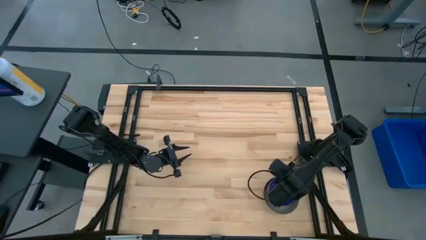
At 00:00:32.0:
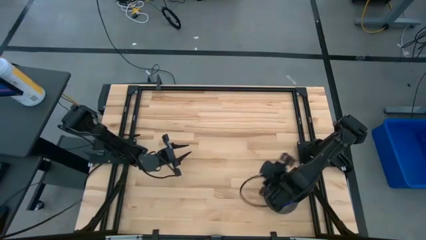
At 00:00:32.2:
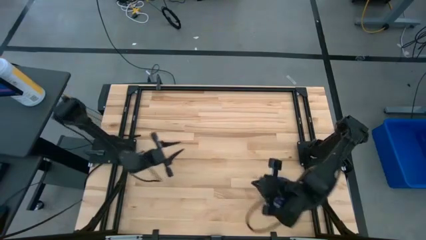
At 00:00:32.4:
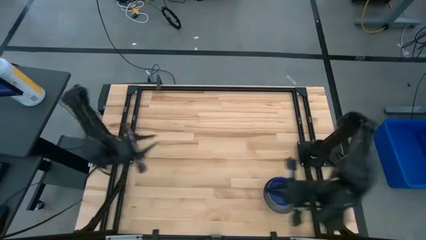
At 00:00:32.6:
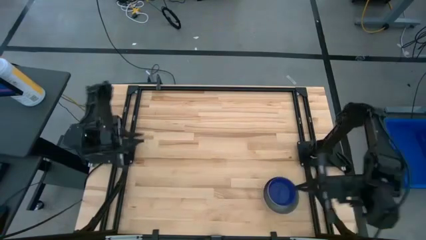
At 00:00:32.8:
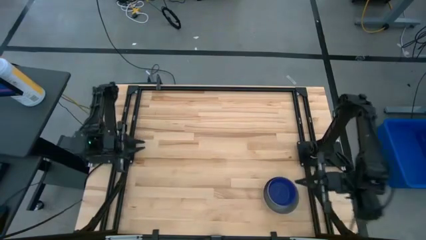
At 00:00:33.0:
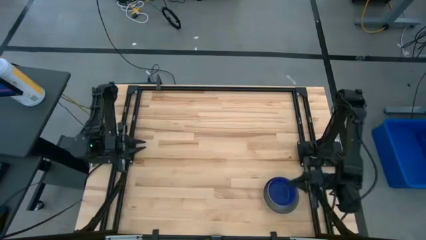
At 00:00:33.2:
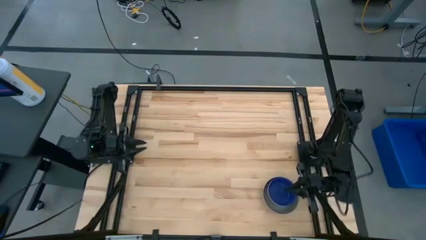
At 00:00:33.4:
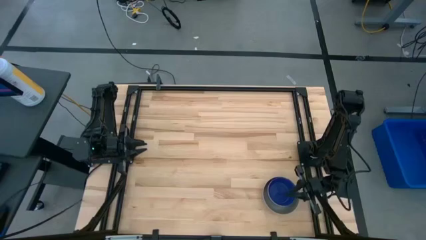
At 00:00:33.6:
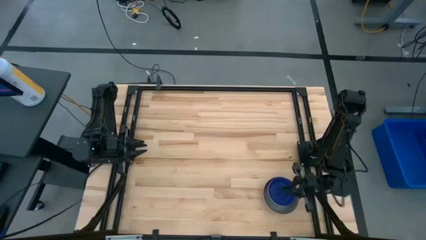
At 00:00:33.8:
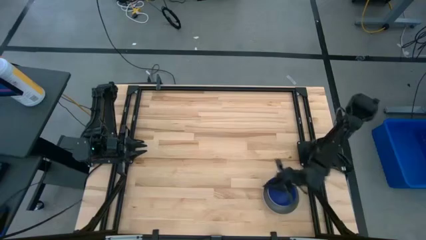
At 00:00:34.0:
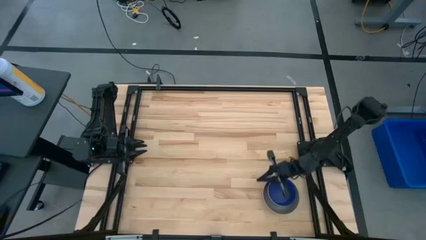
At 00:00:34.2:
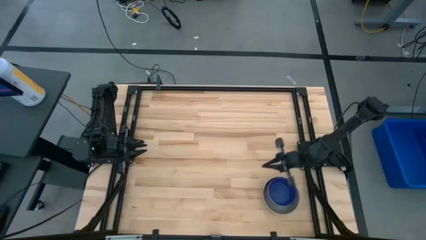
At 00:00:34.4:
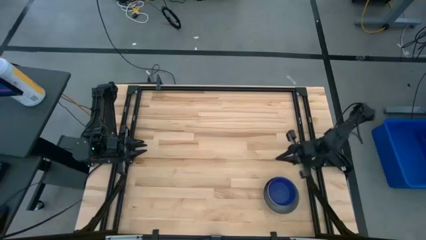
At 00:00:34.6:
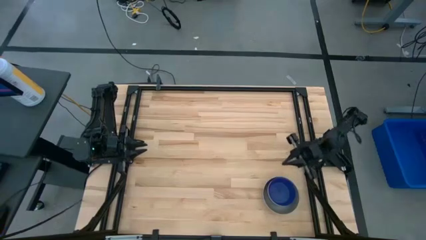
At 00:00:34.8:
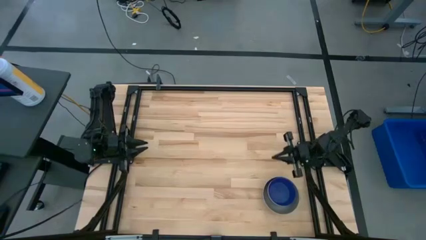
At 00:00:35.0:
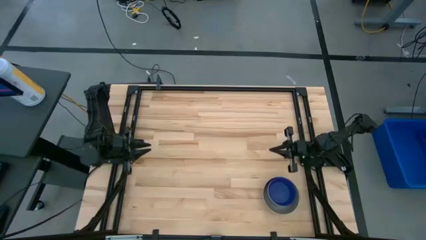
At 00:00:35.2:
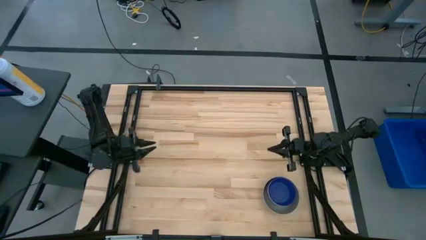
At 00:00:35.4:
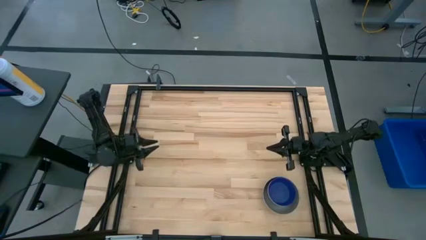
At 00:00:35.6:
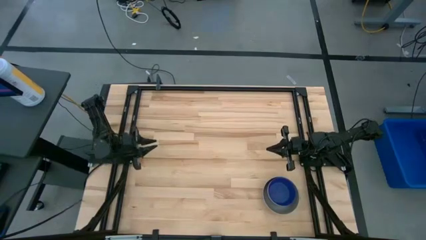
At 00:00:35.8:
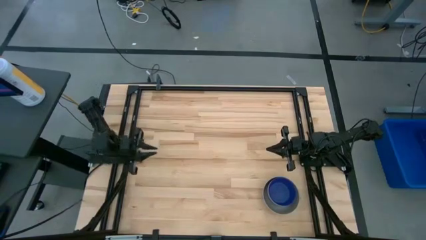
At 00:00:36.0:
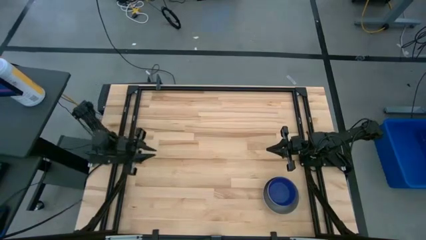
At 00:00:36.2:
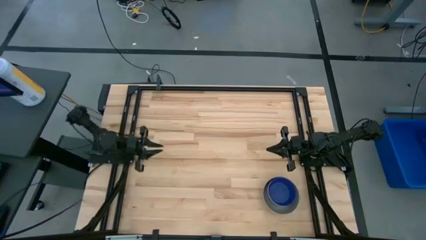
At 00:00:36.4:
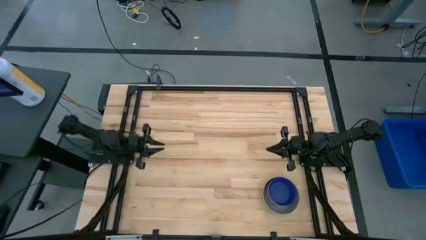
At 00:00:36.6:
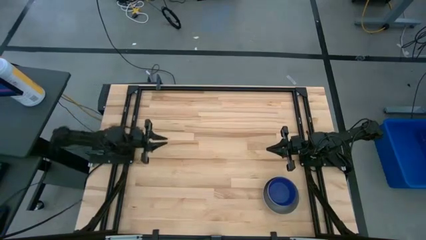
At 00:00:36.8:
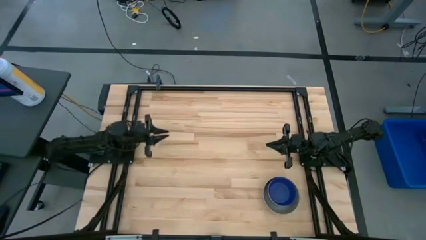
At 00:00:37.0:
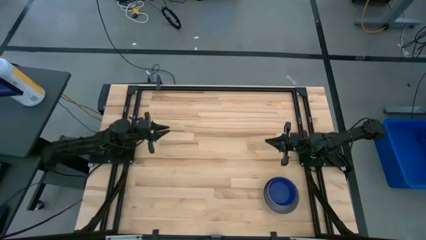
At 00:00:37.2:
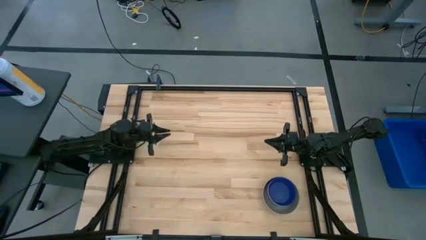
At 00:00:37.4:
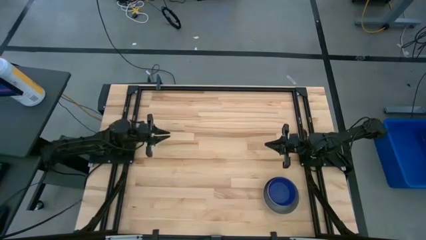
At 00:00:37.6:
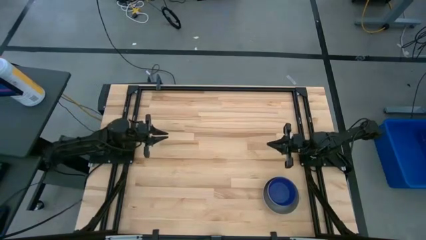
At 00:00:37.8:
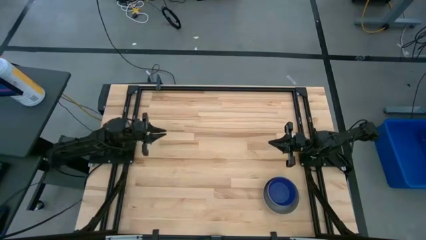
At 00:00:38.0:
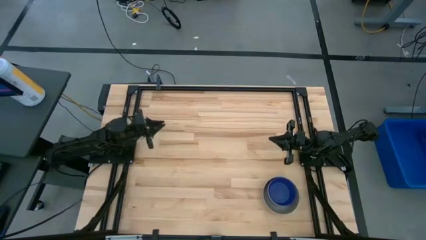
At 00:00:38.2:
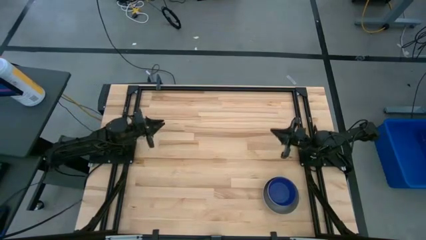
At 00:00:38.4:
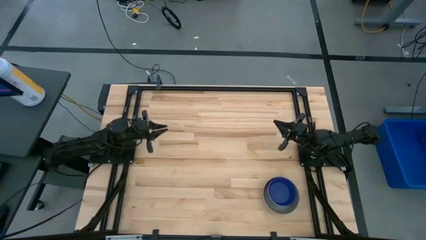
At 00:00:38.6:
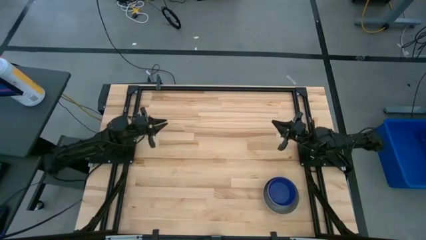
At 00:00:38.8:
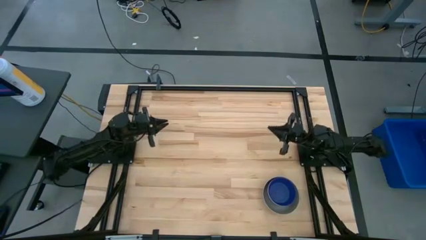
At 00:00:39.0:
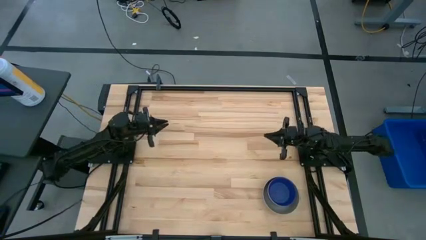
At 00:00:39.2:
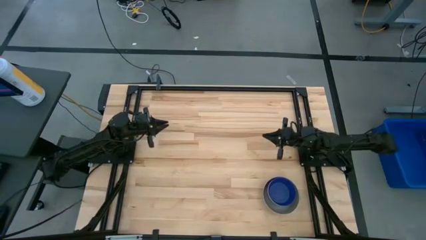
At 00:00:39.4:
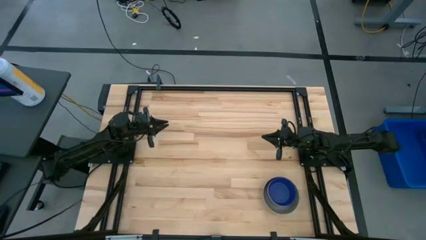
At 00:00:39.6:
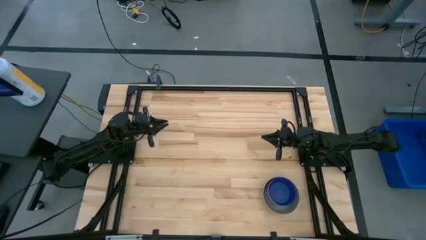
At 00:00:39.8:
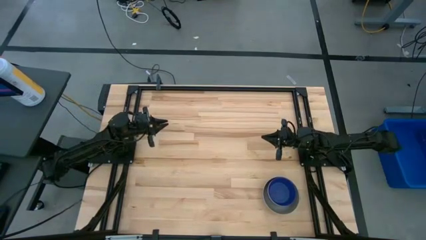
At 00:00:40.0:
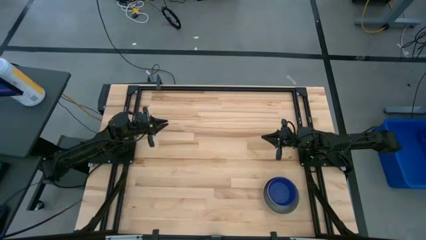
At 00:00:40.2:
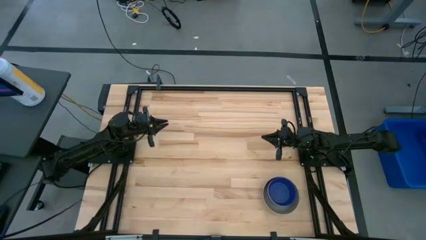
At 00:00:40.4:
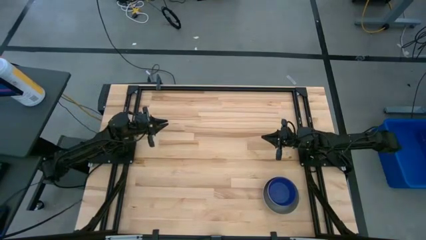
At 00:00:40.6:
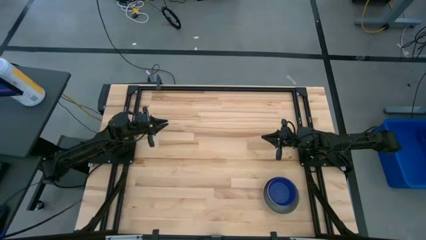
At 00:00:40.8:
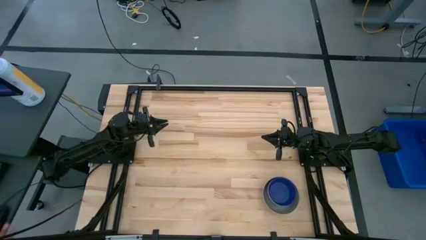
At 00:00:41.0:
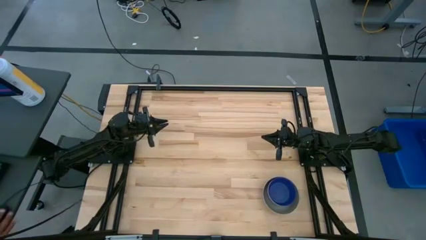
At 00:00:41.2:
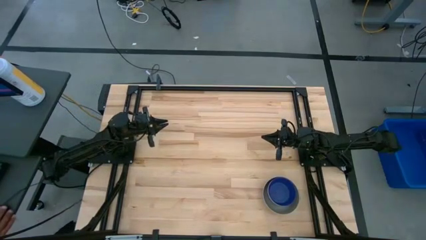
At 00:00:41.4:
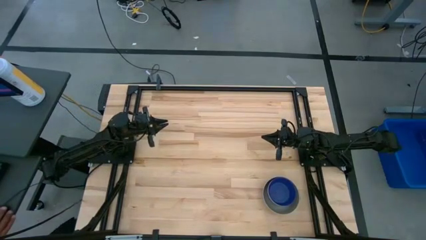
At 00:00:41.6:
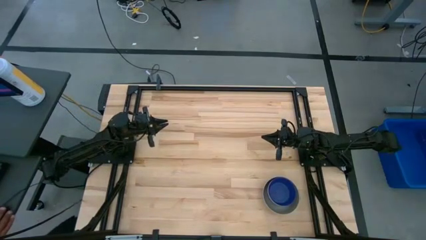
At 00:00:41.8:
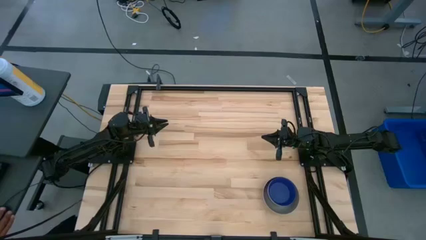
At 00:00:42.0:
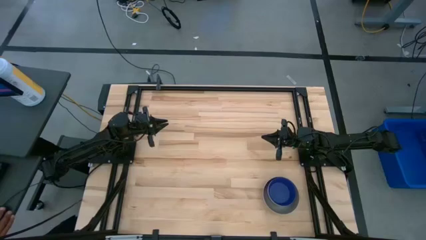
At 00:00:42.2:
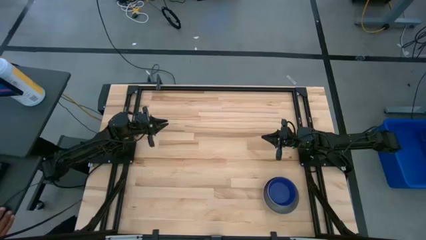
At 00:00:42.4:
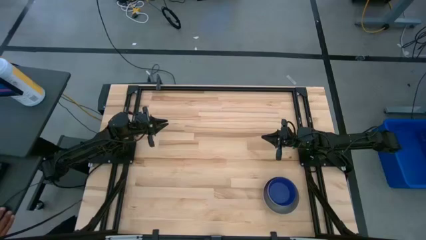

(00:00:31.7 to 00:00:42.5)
Return to Home Position

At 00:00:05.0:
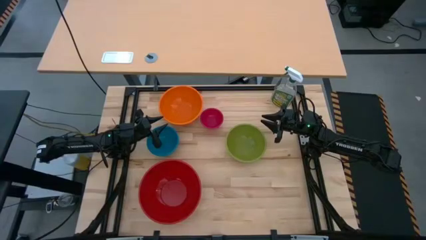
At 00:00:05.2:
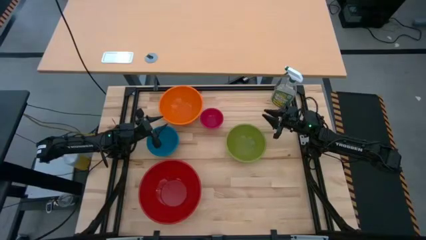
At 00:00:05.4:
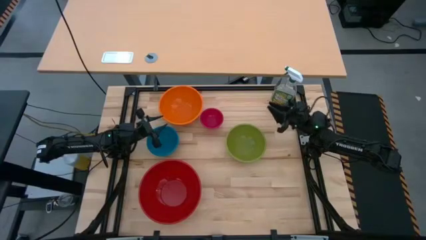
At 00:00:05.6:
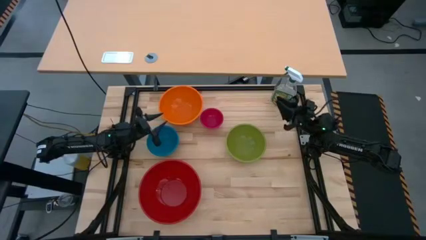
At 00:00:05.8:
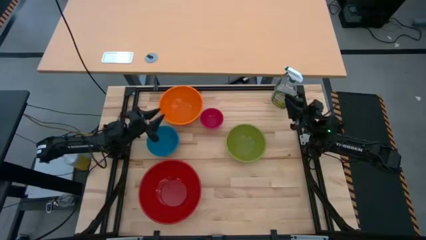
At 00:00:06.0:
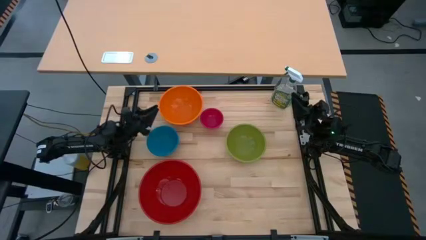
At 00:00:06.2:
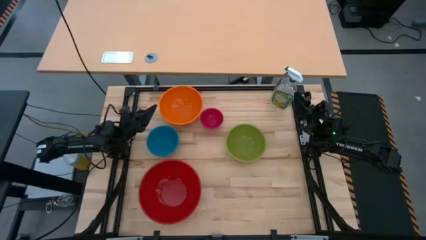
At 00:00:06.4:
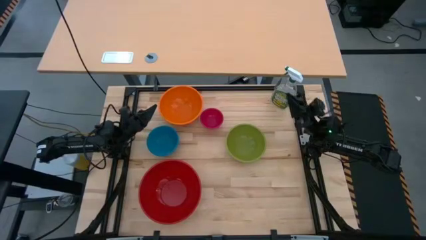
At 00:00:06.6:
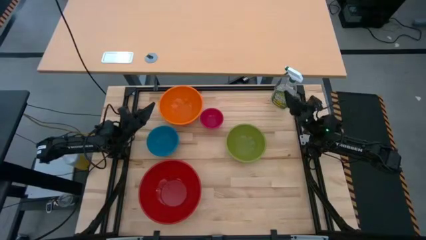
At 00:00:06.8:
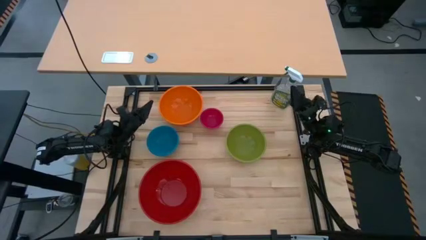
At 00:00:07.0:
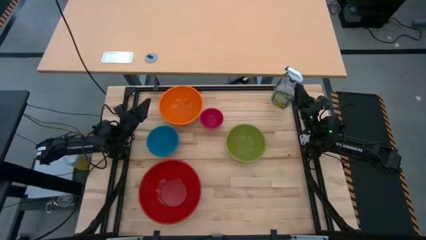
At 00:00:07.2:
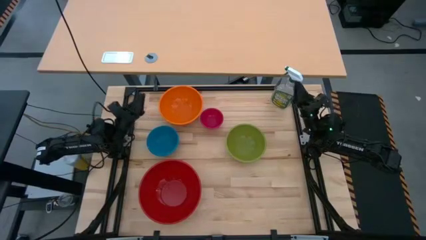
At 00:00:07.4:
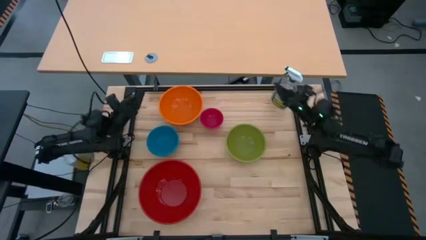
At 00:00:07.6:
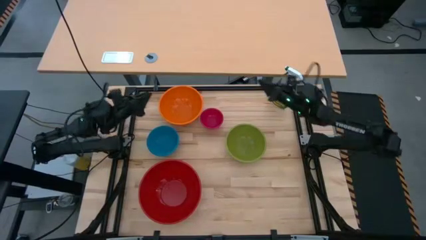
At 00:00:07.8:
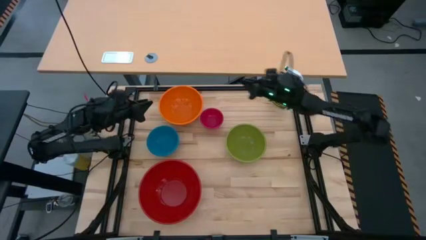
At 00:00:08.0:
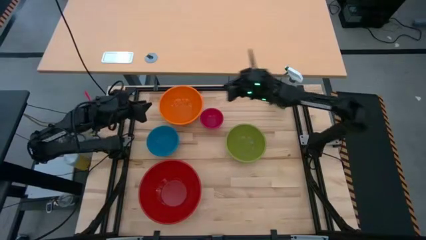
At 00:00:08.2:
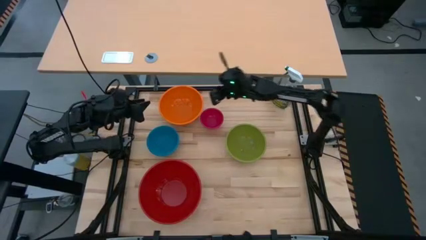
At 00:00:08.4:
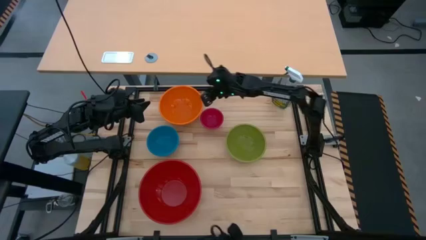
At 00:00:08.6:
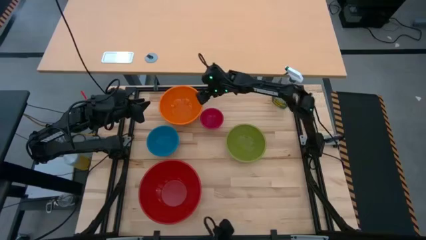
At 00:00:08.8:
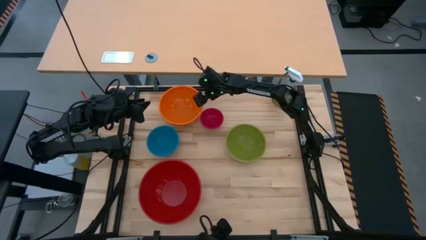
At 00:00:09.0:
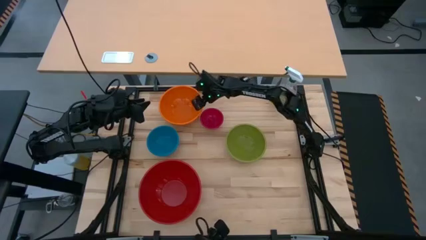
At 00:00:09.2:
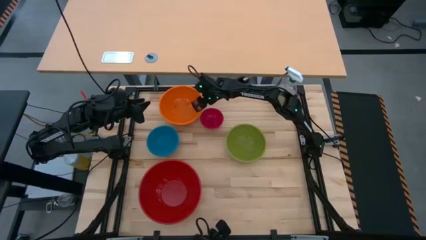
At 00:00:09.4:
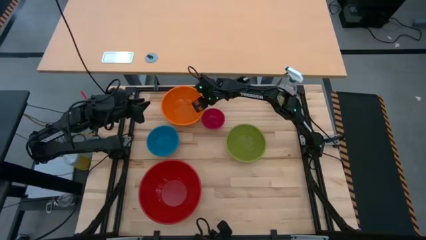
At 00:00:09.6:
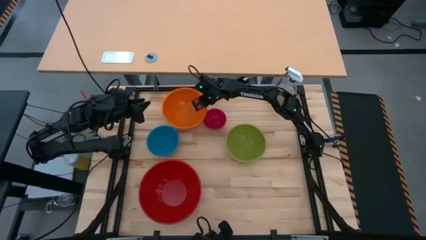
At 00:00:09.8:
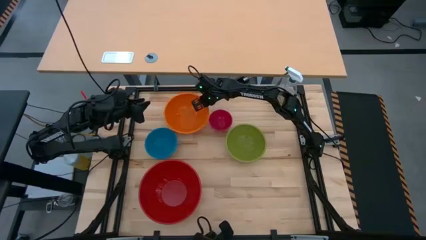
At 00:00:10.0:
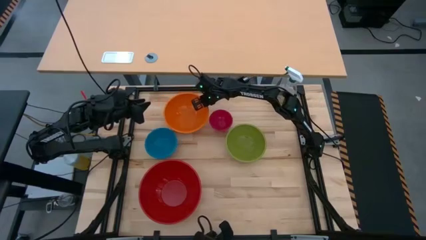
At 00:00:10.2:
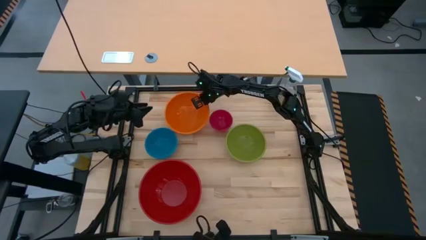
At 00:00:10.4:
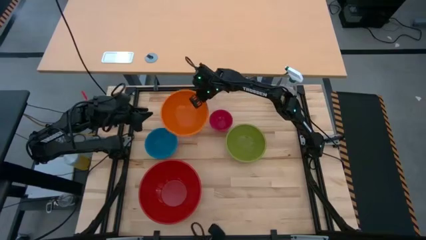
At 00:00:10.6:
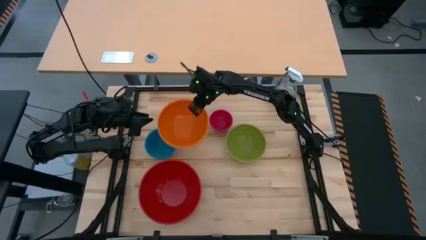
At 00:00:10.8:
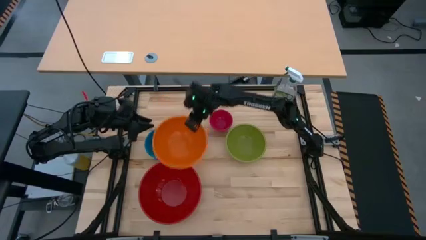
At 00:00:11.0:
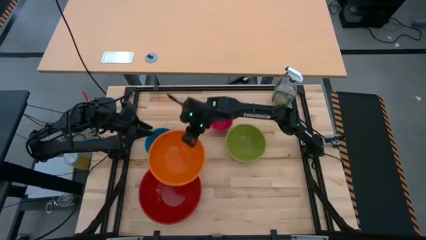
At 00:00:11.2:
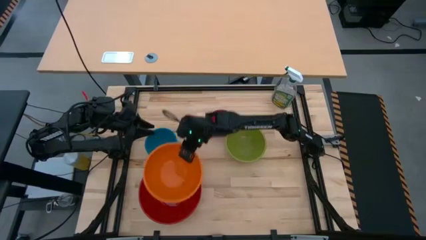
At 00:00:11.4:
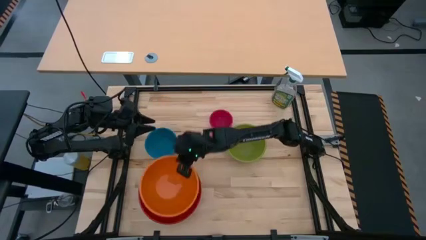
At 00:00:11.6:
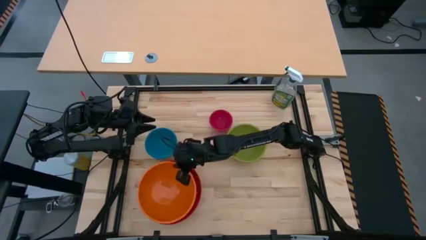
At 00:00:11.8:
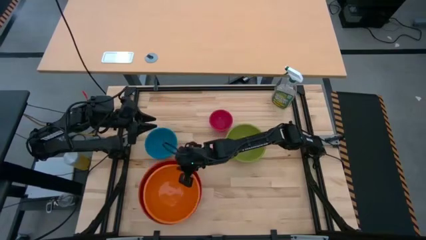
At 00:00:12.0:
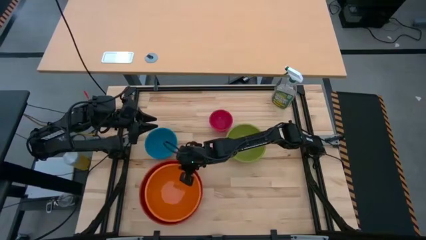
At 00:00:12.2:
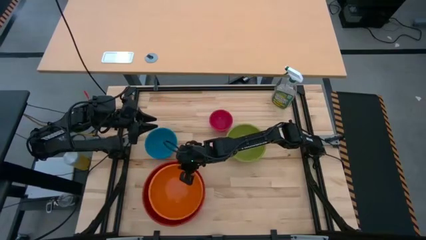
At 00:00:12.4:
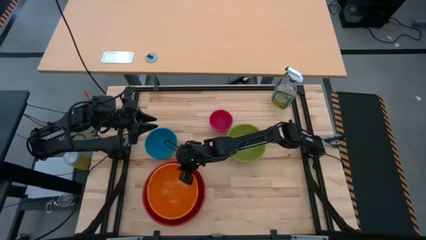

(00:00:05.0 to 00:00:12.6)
Stack the orange bowl on top of the red bowl
